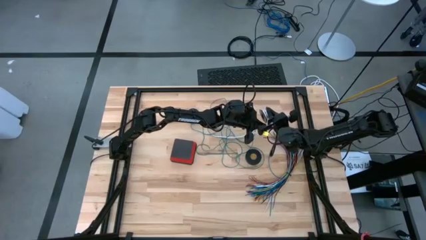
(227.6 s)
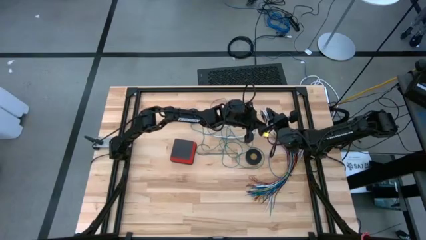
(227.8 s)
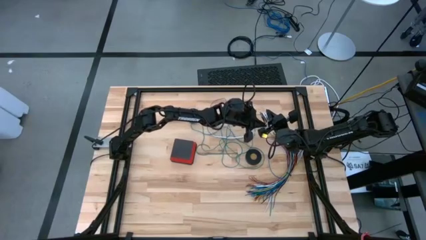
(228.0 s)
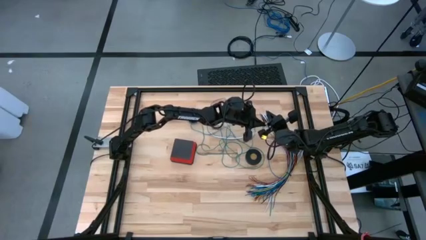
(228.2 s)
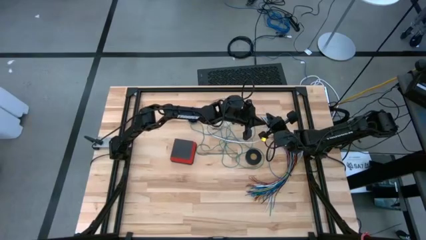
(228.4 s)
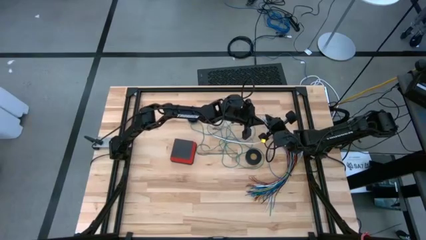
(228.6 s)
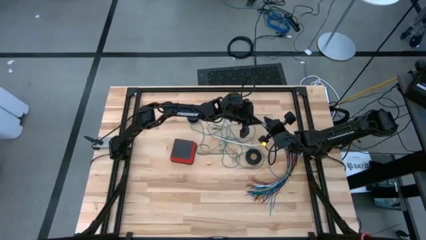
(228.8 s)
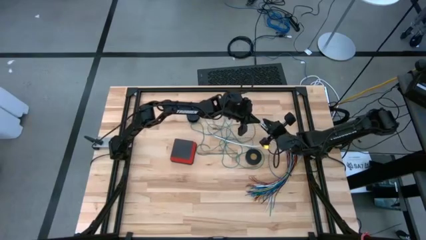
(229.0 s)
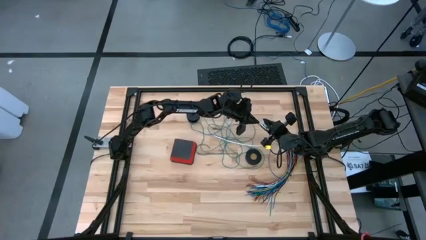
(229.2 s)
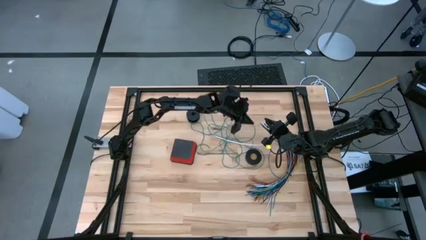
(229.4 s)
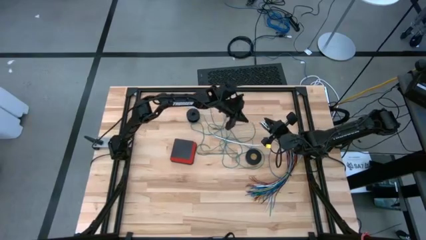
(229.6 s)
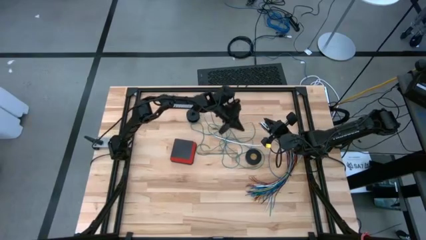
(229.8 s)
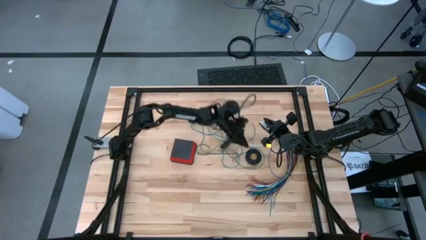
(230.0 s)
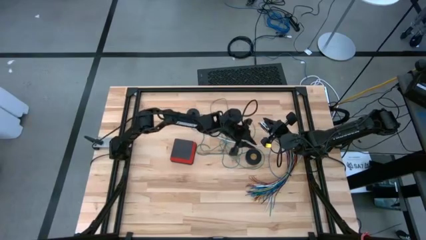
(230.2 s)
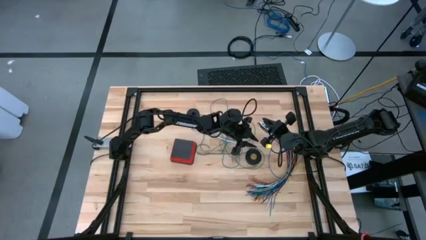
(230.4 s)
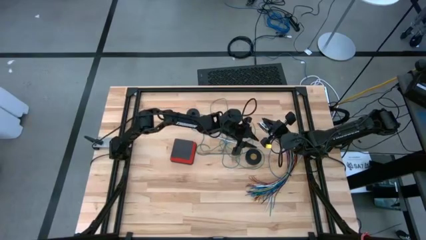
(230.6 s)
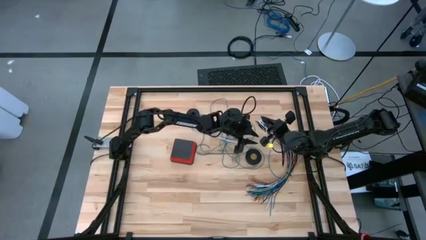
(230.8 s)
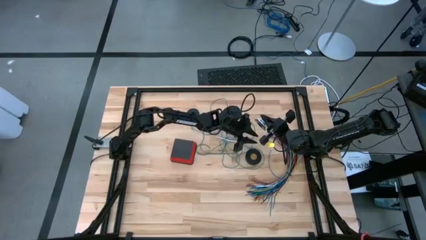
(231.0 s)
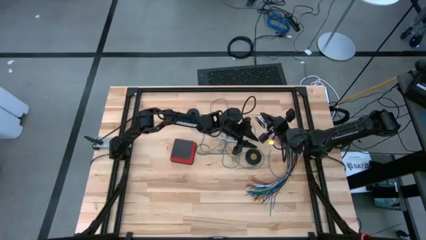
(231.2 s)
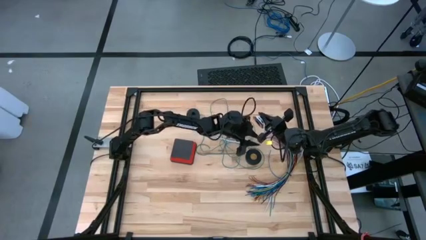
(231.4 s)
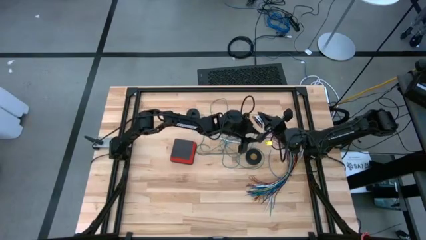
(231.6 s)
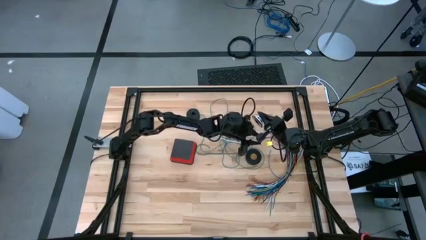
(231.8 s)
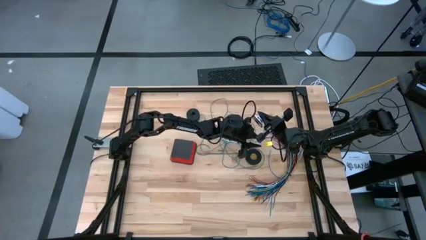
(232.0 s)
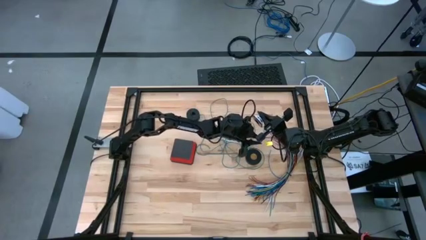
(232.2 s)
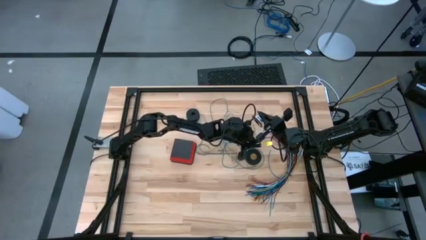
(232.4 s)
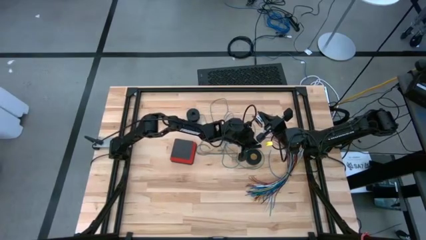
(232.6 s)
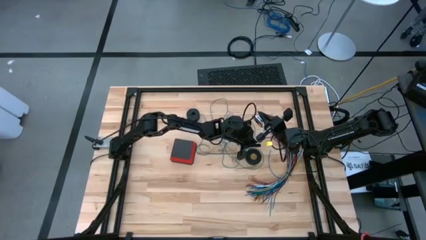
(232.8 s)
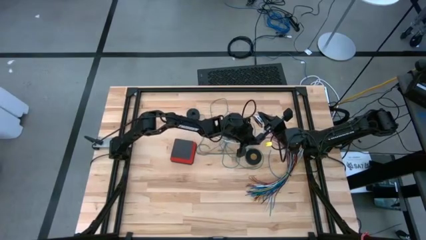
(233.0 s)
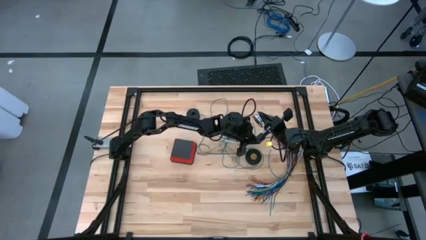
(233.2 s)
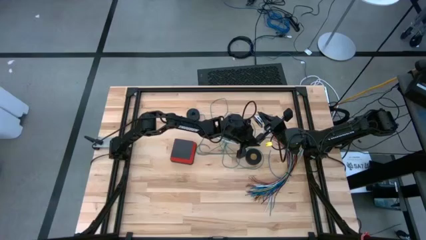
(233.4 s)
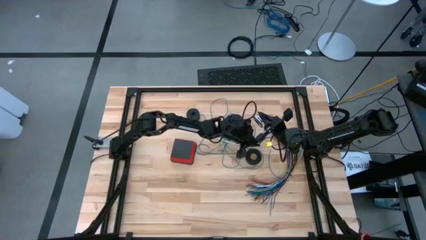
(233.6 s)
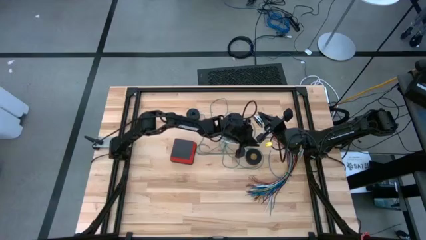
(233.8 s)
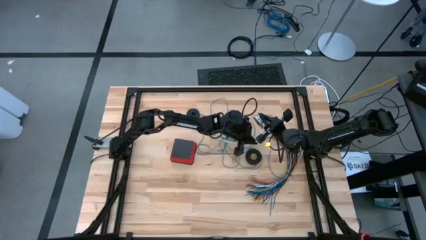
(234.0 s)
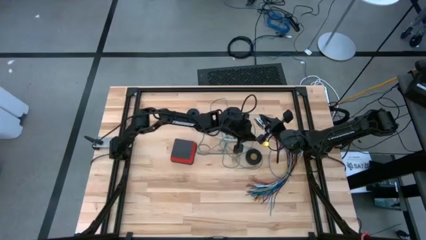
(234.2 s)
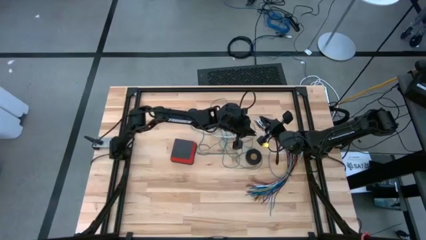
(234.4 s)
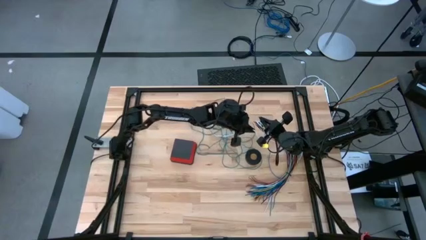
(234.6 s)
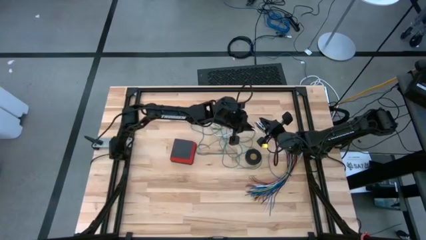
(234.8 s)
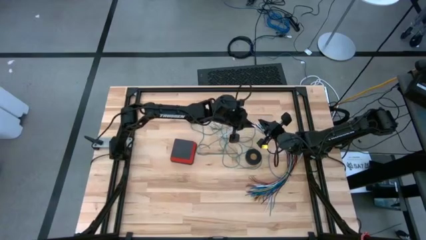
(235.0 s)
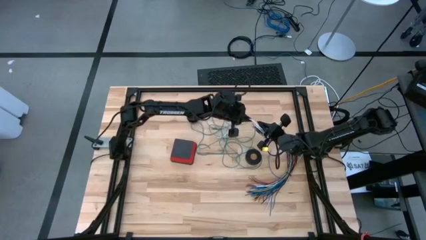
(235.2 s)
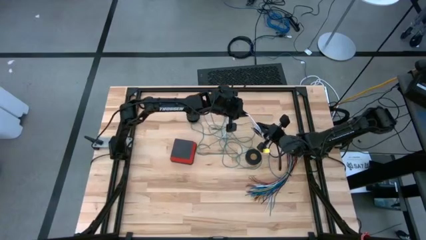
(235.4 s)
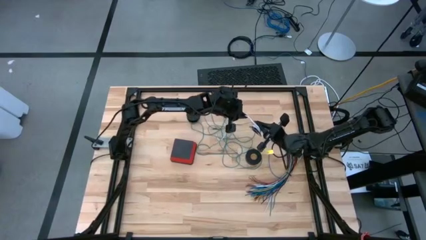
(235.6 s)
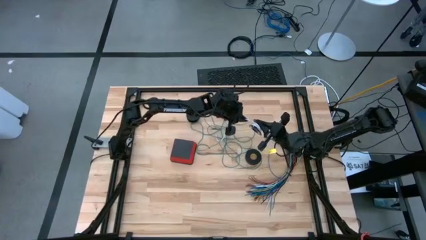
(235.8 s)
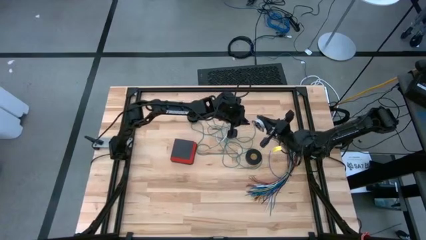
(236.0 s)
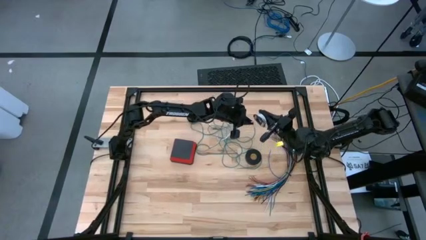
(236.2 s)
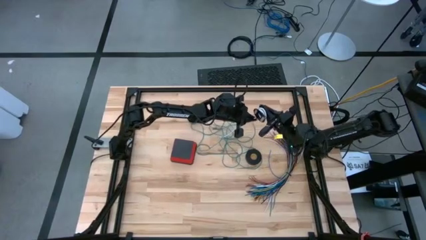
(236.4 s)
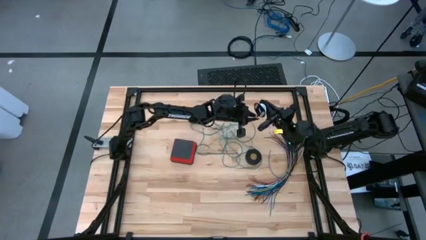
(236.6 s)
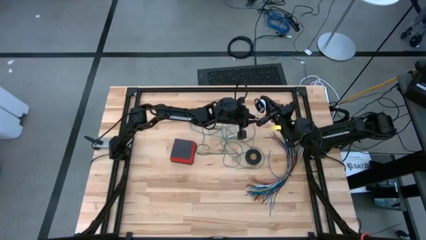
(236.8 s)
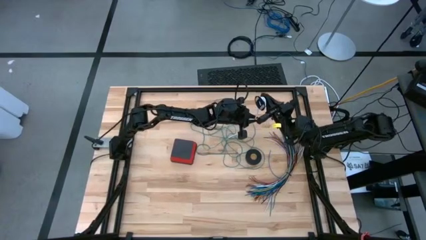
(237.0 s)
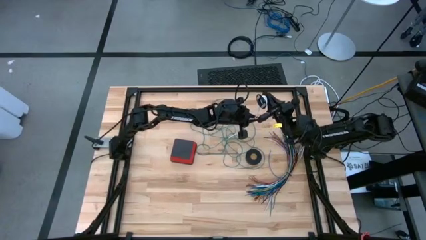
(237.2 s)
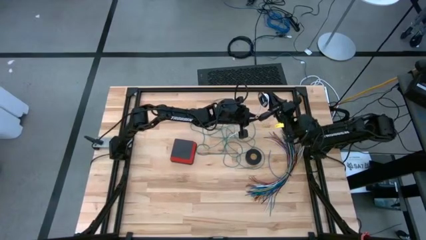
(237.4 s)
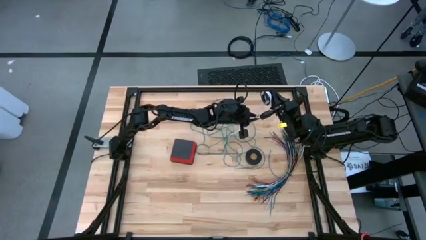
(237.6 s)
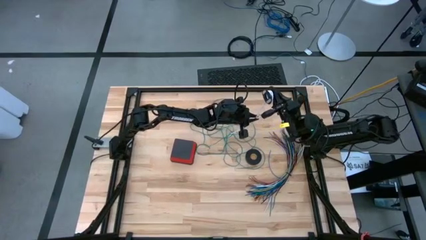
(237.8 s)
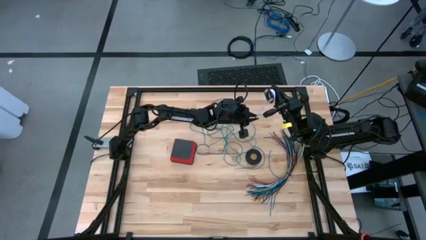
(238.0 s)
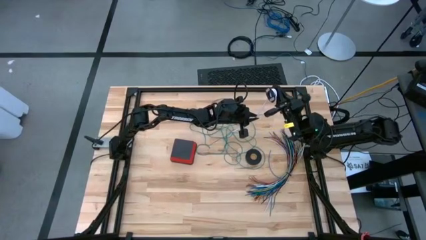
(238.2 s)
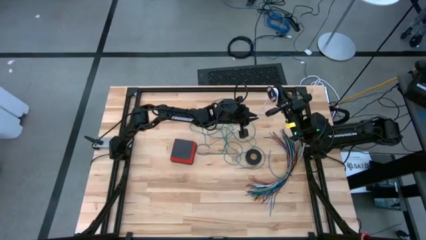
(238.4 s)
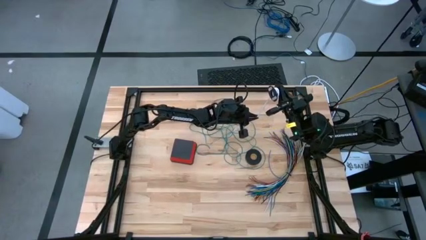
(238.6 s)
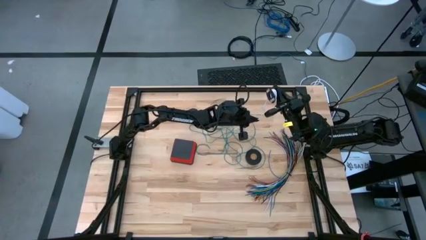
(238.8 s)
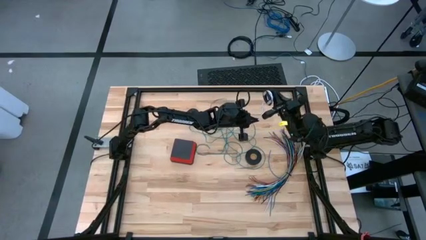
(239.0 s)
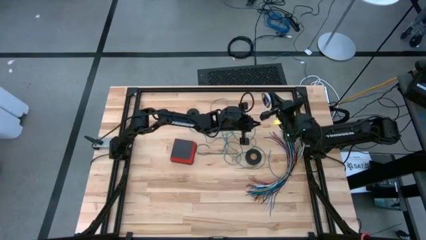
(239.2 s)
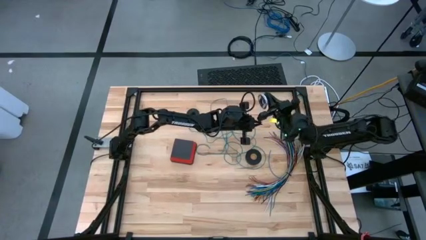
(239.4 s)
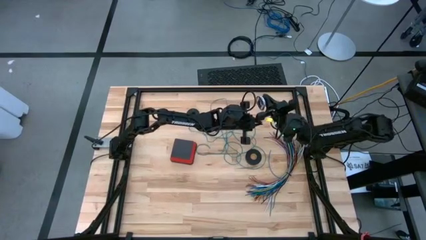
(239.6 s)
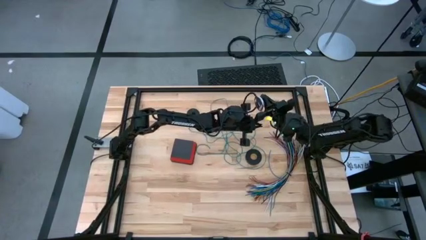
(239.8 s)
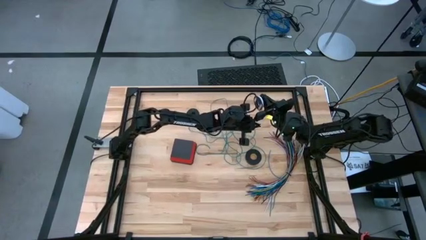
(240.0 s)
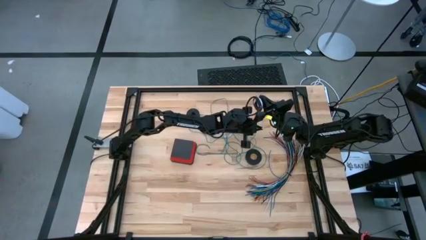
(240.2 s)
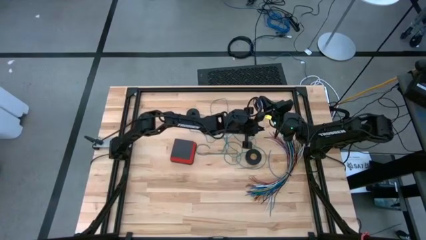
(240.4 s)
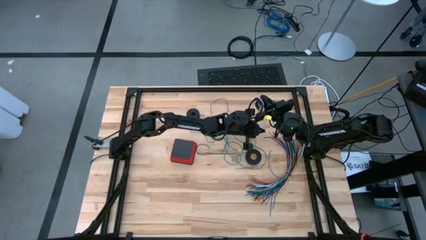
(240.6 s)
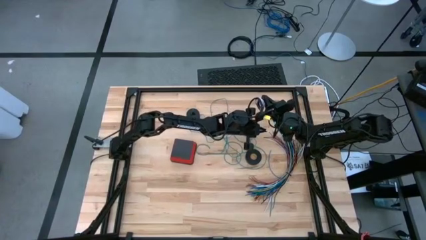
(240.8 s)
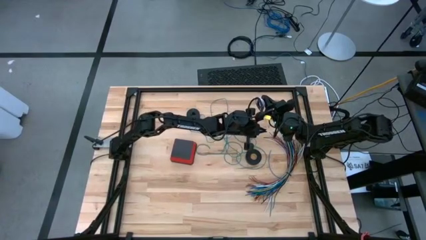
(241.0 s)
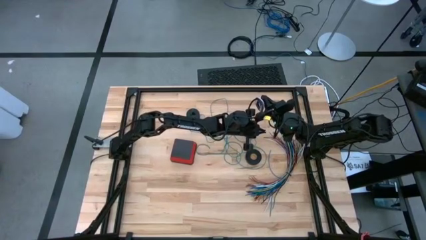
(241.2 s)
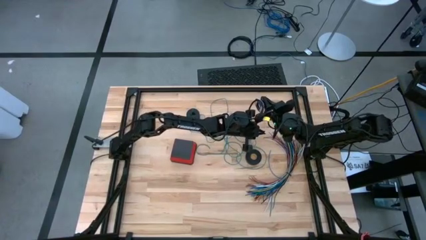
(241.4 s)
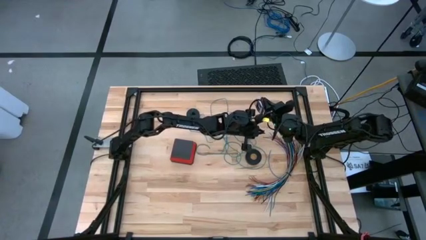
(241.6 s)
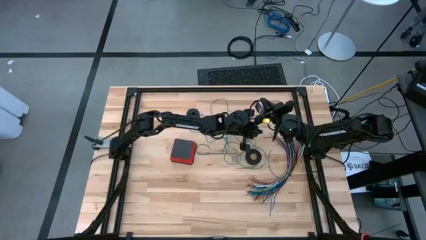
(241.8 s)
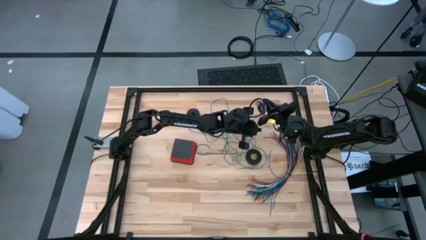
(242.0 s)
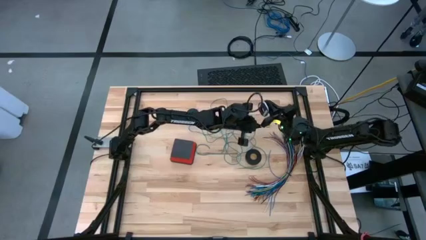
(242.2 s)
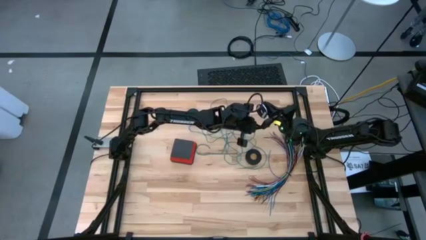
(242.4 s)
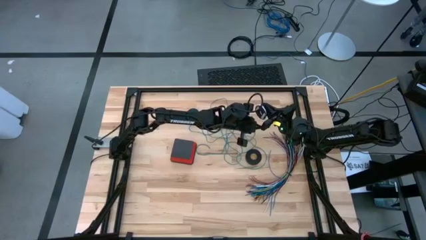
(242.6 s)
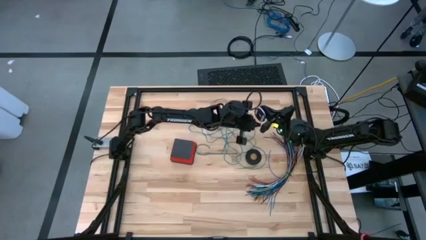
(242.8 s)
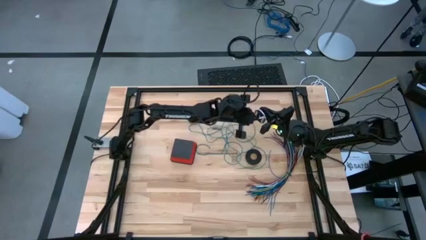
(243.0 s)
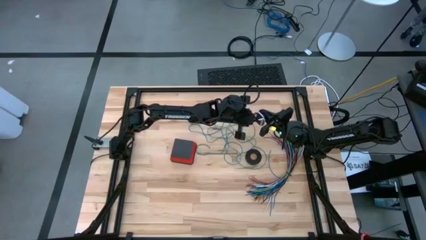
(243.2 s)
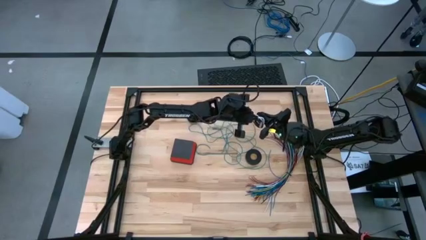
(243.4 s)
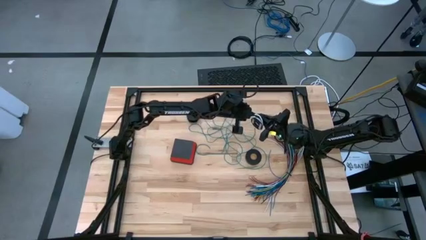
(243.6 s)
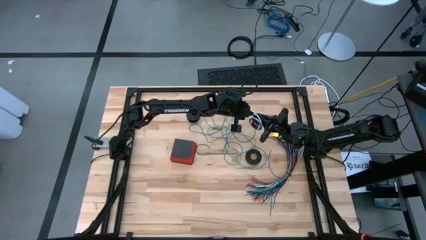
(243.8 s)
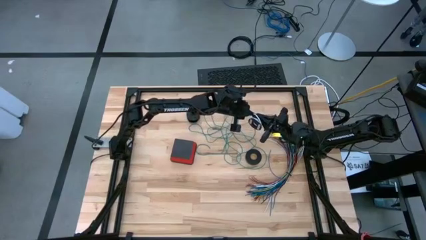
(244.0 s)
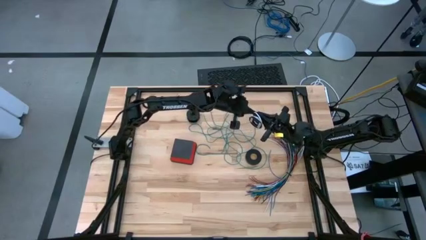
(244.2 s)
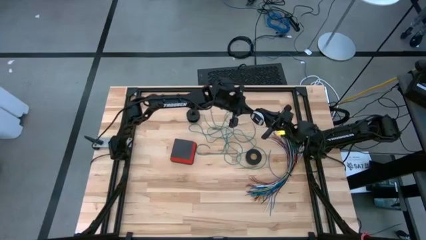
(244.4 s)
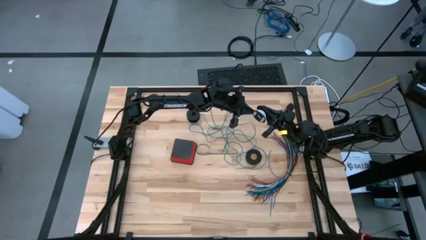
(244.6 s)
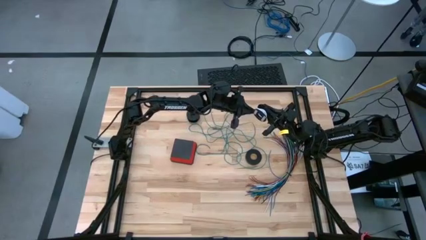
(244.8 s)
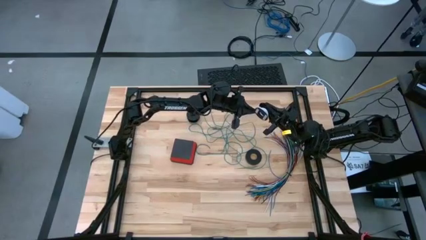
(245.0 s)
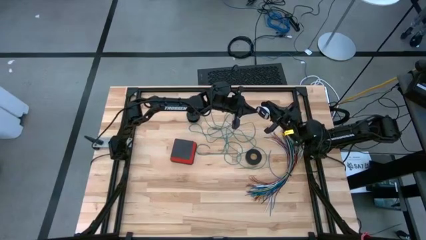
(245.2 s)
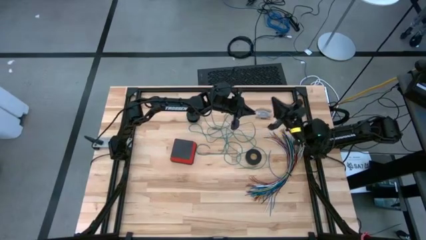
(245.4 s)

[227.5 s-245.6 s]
Task: Coiling cords
Coil the white wire cable on the spool
